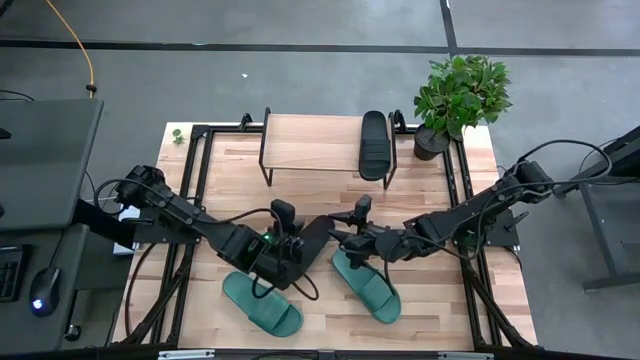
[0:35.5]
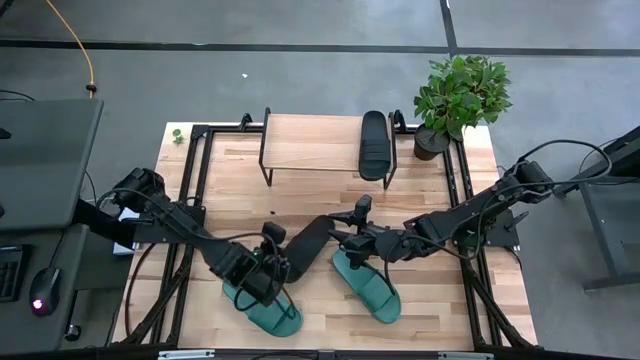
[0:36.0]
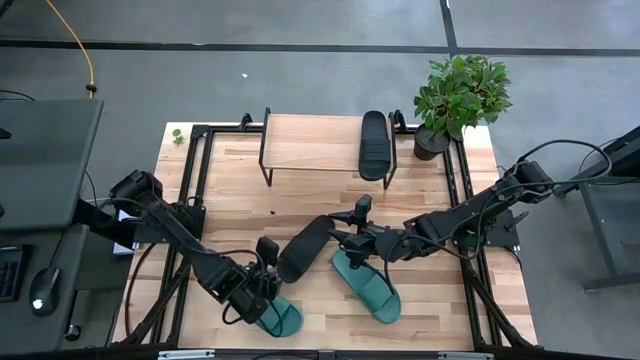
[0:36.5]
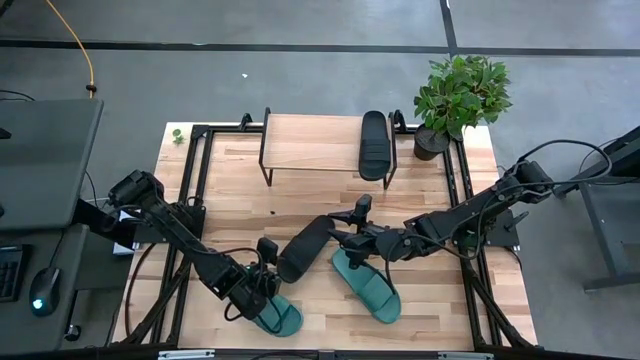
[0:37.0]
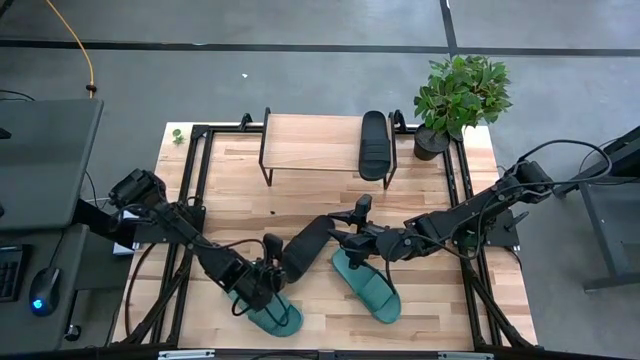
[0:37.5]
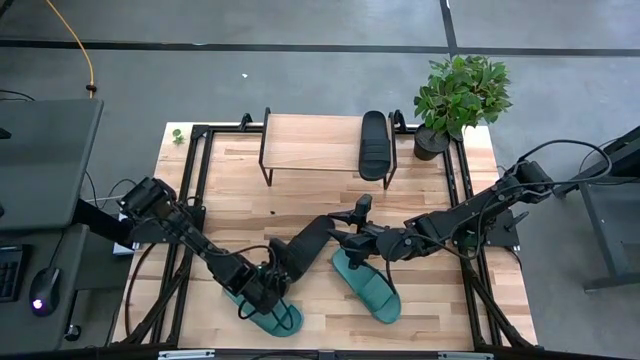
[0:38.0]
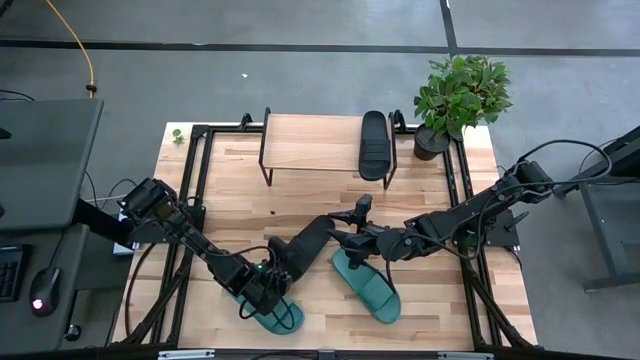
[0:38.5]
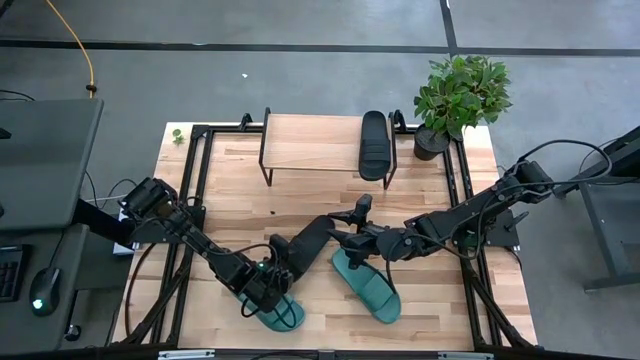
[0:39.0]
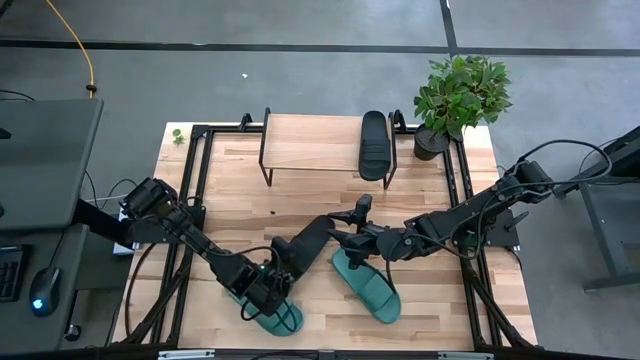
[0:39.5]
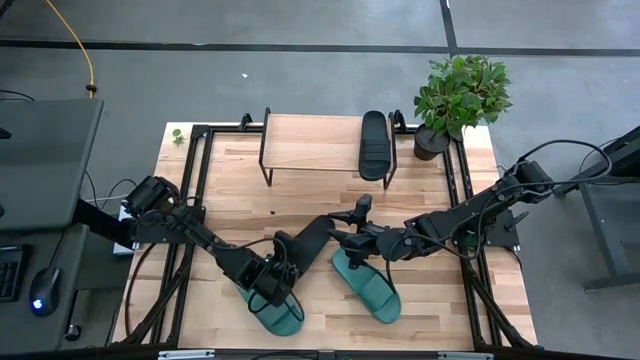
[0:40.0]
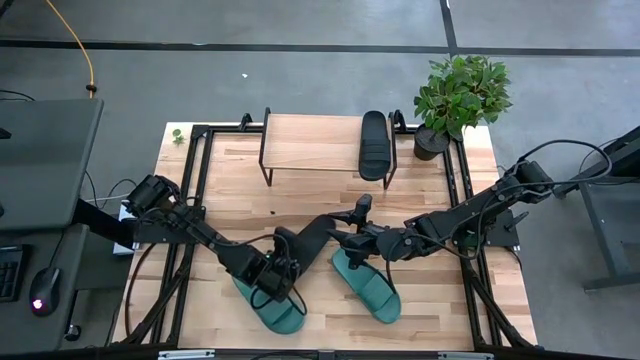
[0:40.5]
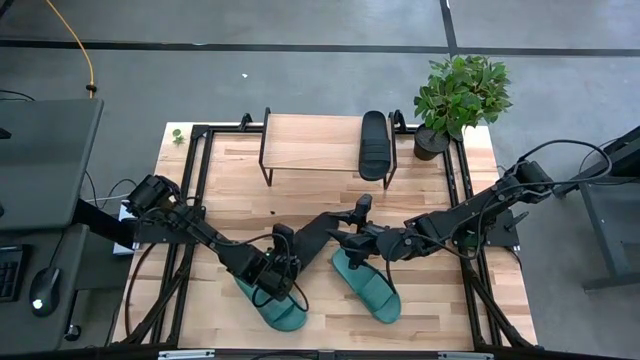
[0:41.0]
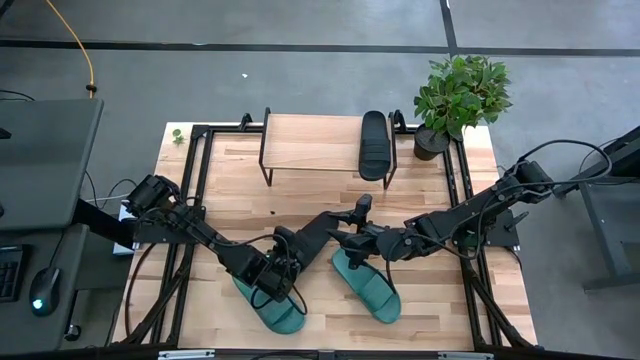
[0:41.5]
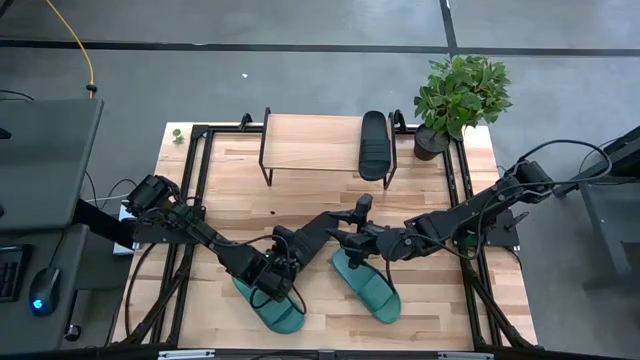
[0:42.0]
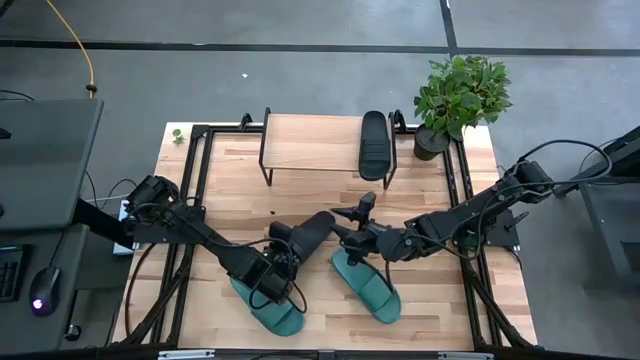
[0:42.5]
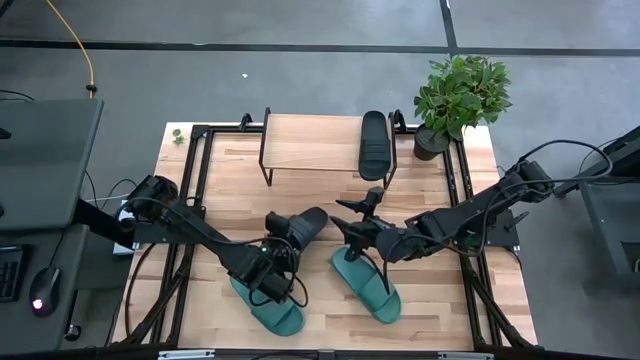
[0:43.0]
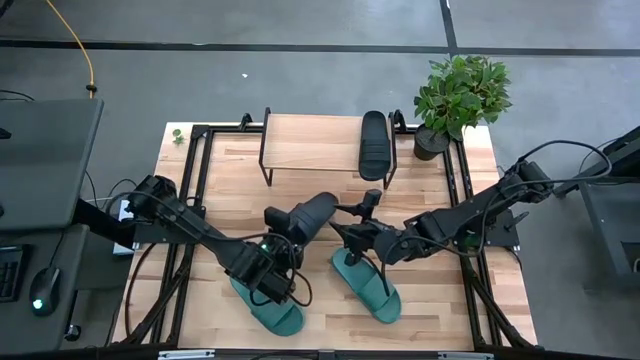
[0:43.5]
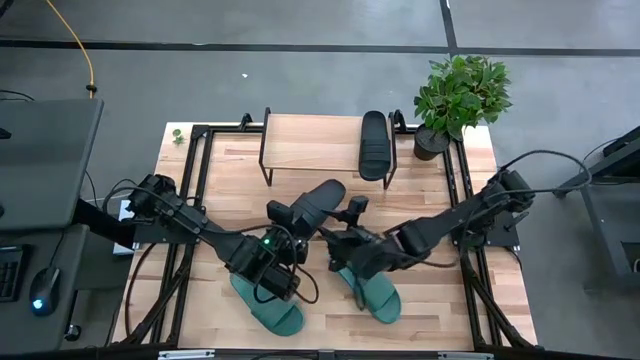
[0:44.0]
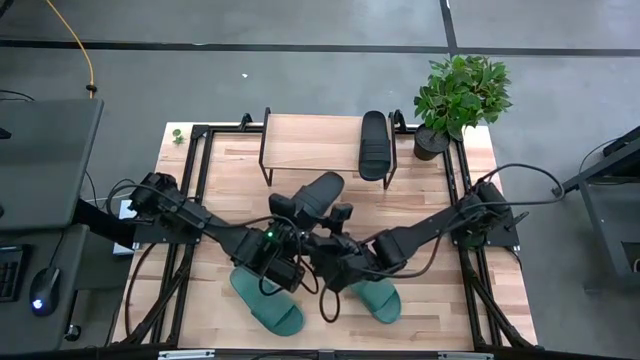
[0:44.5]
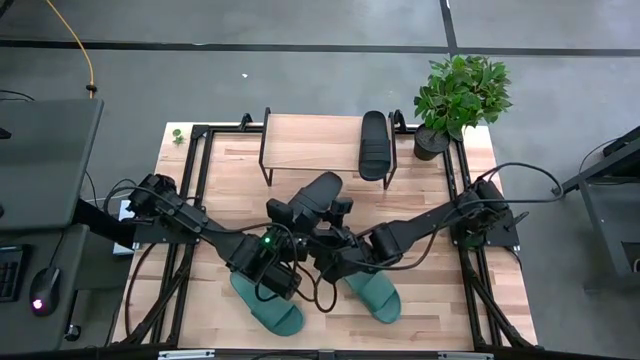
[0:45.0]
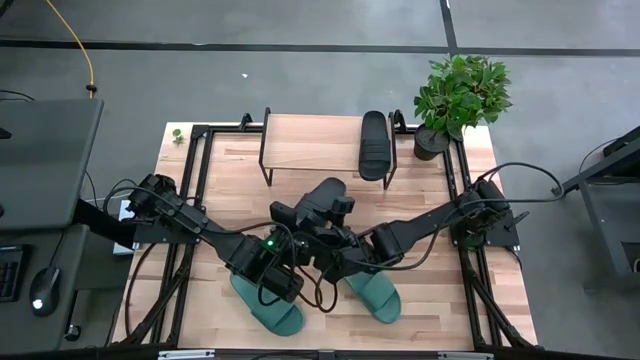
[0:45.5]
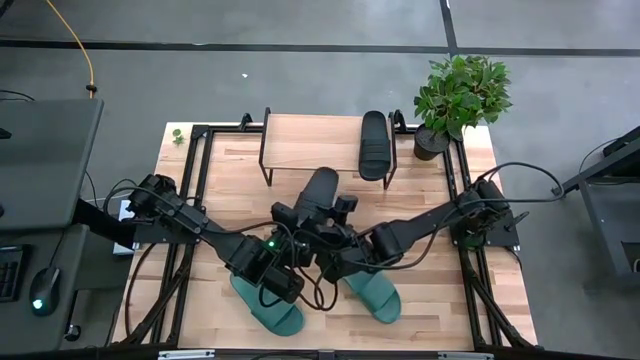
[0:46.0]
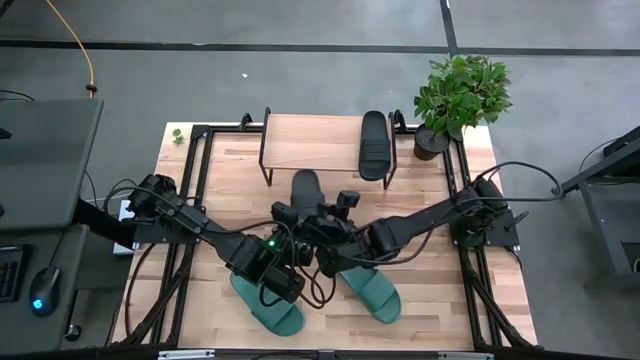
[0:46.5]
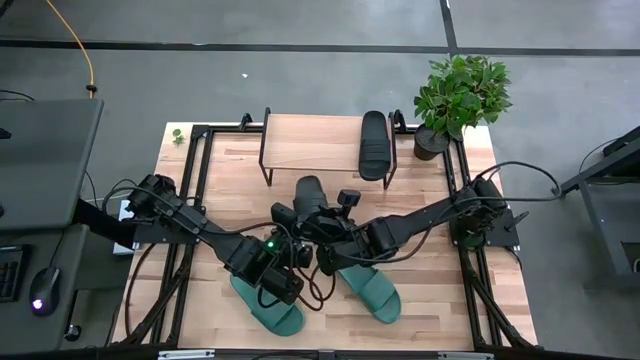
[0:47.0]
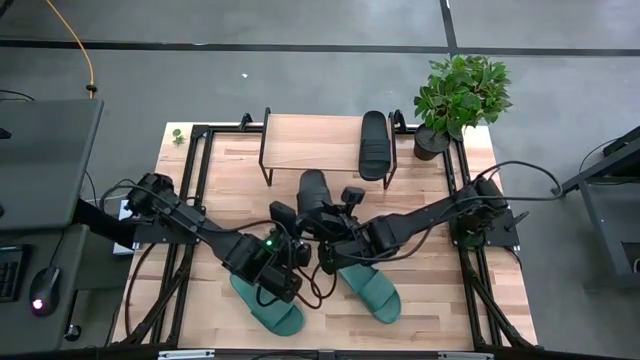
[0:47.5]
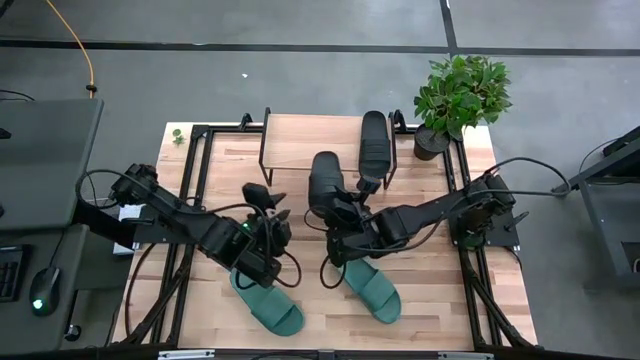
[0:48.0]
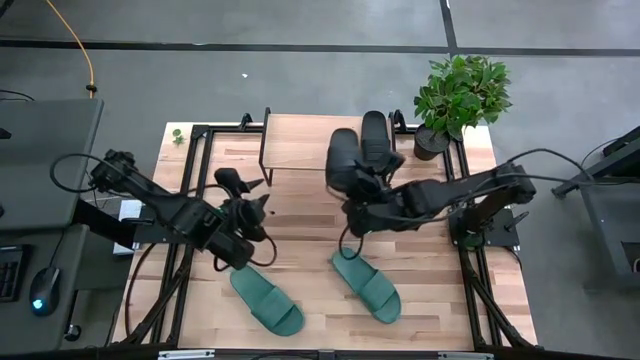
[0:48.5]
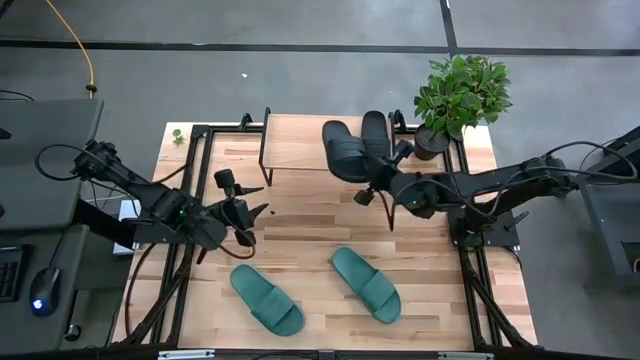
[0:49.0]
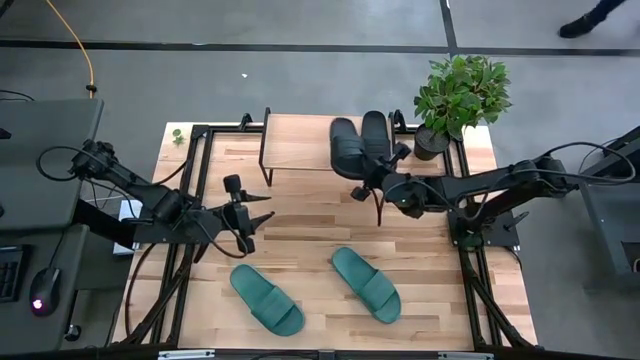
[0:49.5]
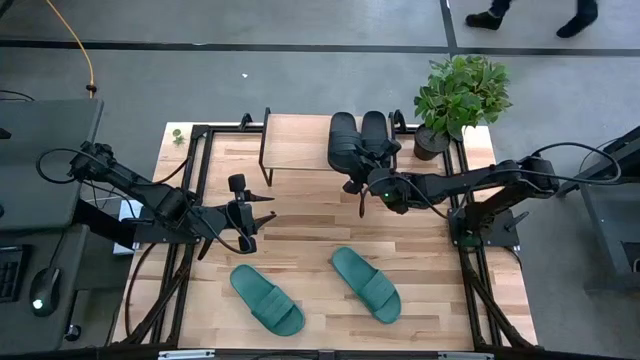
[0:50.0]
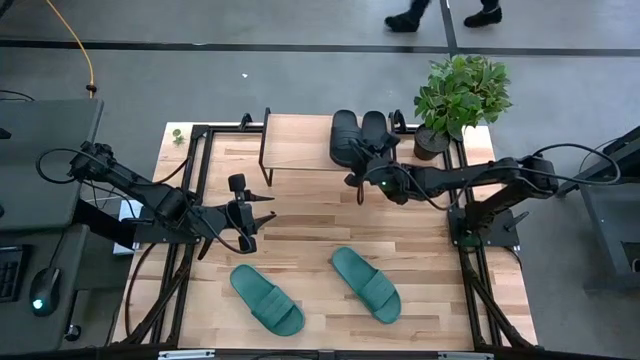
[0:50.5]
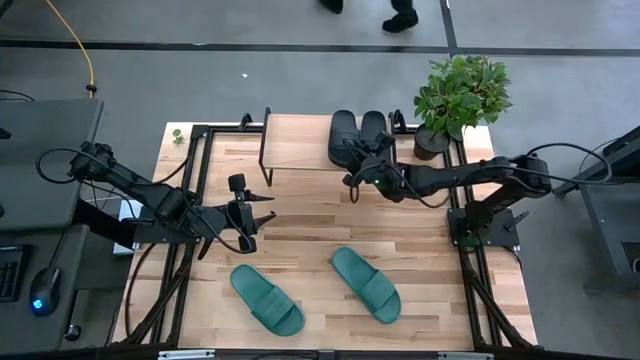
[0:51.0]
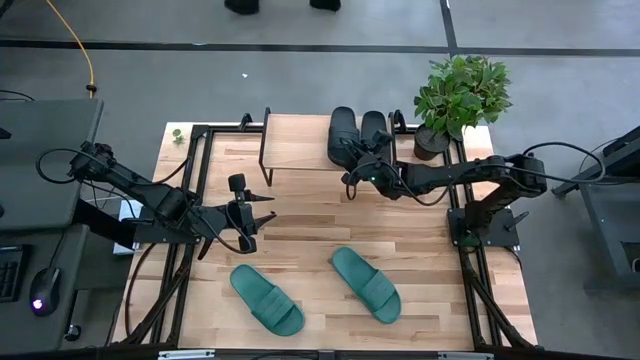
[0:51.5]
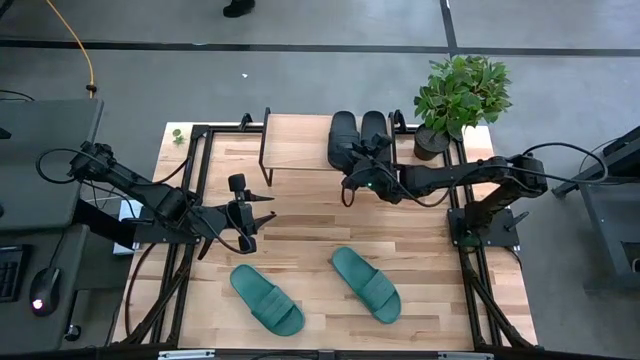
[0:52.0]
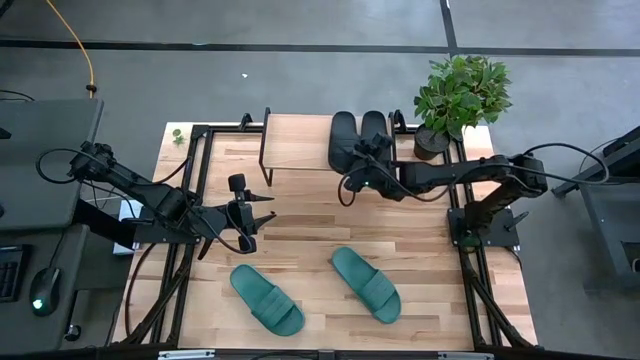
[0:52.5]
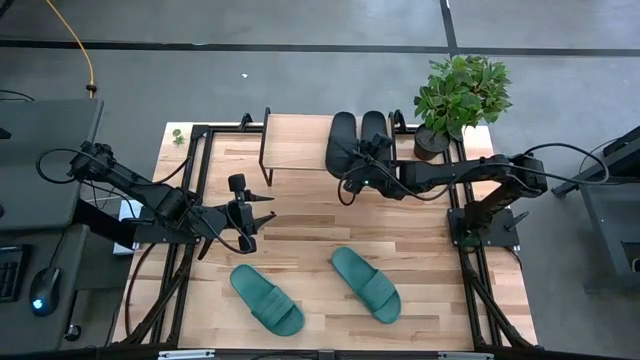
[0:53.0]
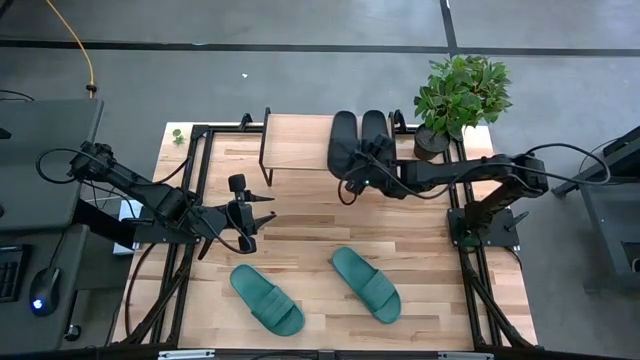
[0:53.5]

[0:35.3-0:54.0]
Task: Pick and place slides into the shelf
Put the black slipper on the shelf

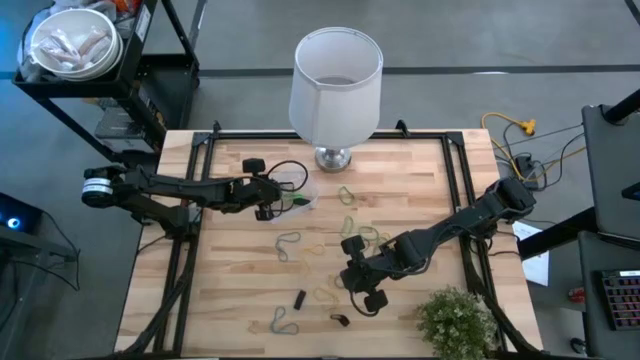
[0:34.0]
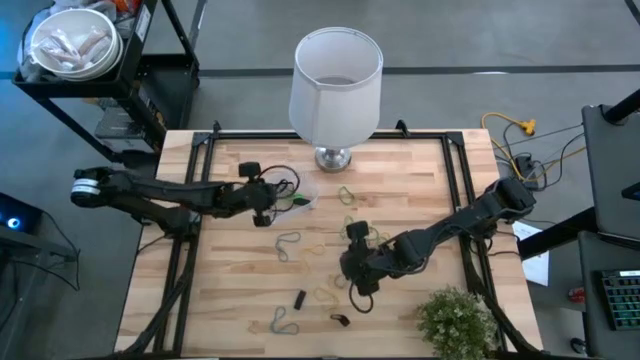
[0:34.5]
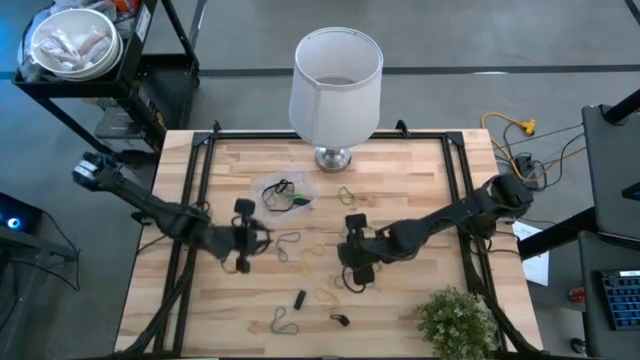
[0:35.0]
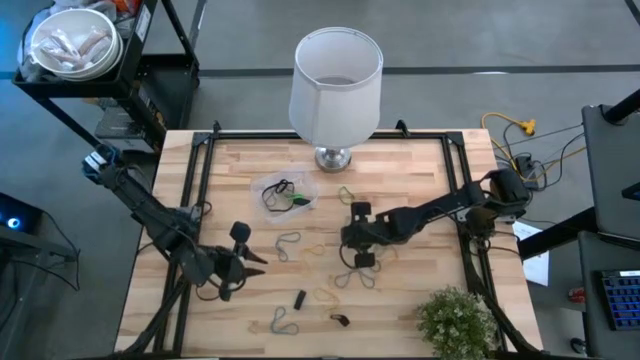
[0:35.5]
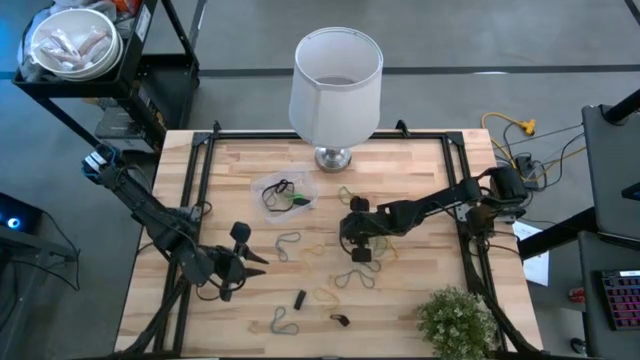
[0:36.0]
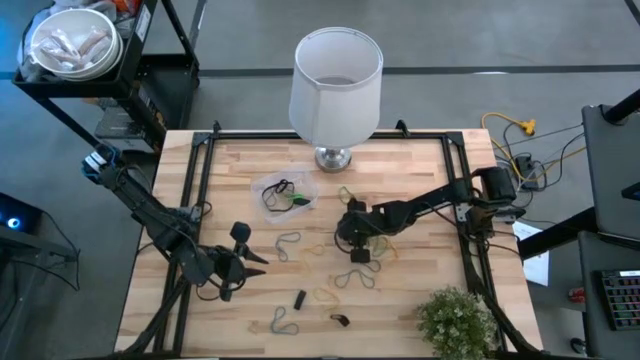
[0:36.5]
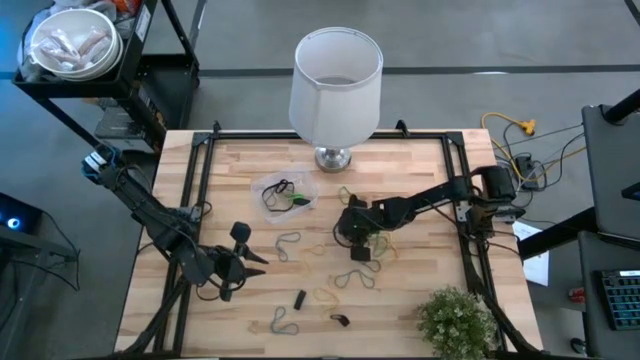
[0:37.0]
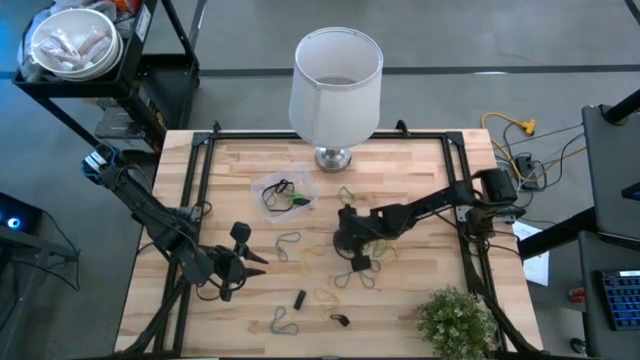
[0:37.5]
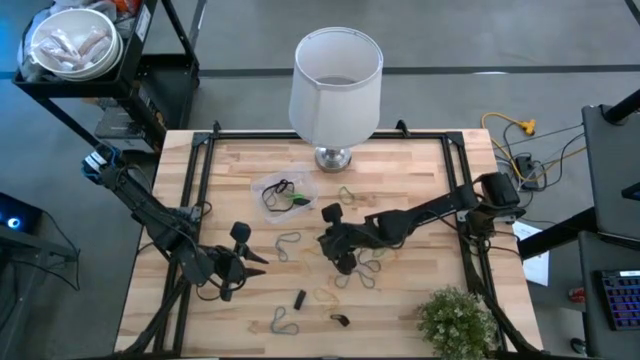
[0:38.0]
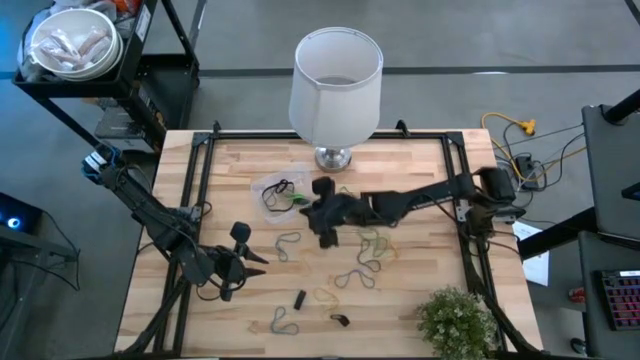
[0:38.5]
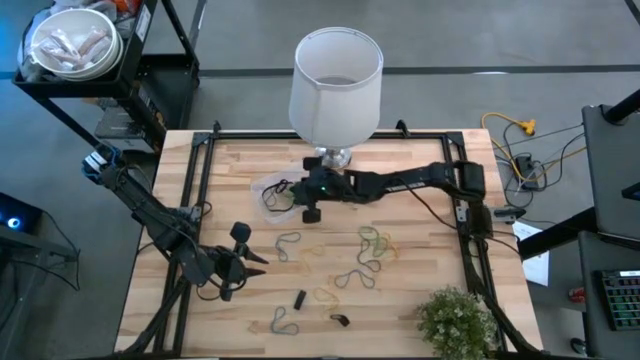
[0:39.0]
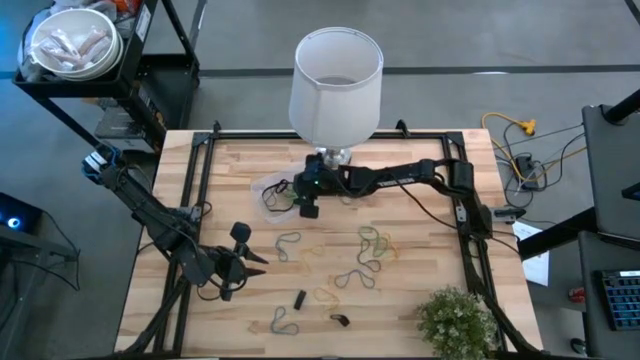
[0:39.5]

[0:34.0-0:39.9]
Task: Pick and place rubber bands into bin
Put the green rubber band into the transparent bin
